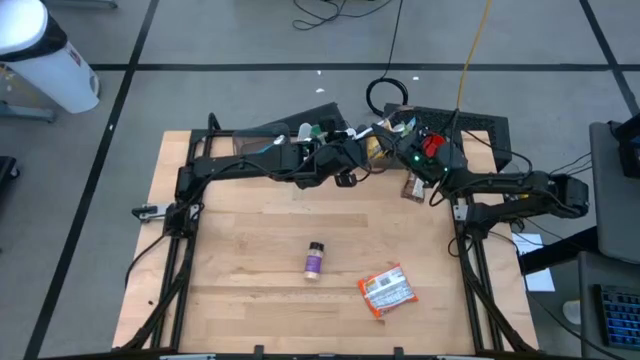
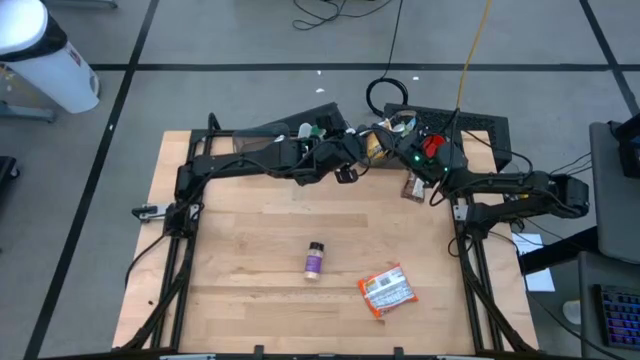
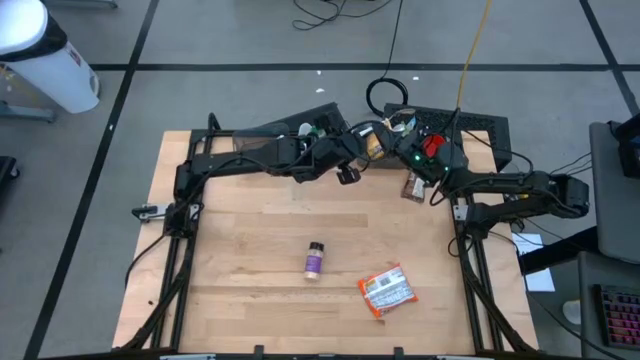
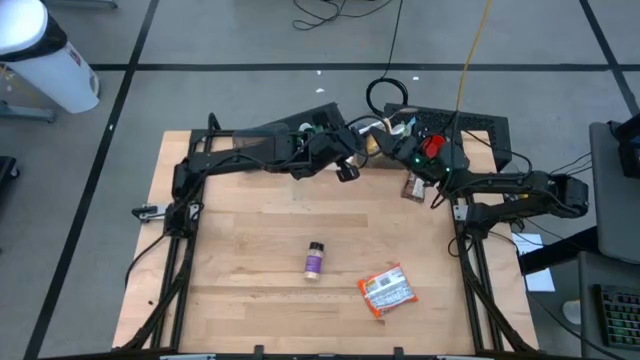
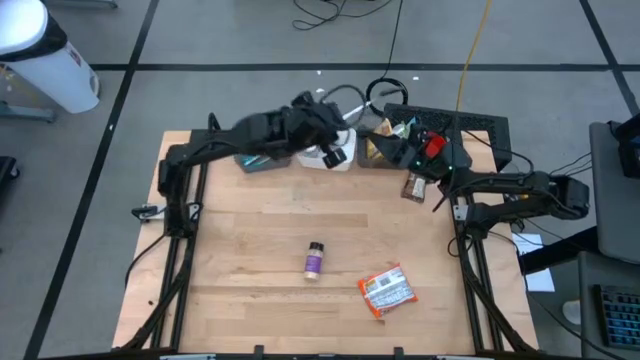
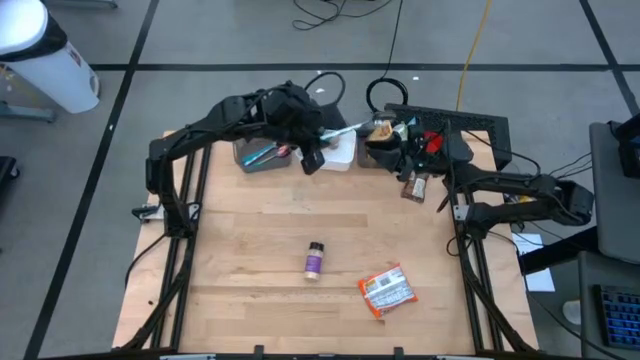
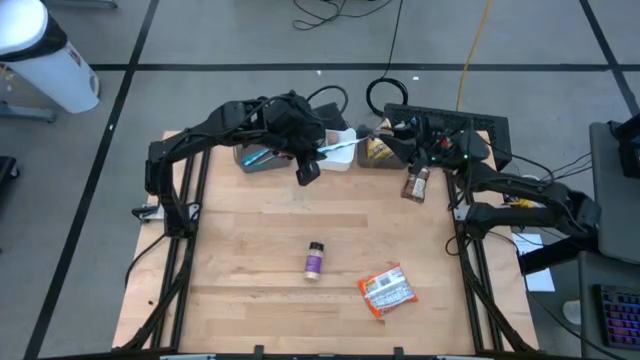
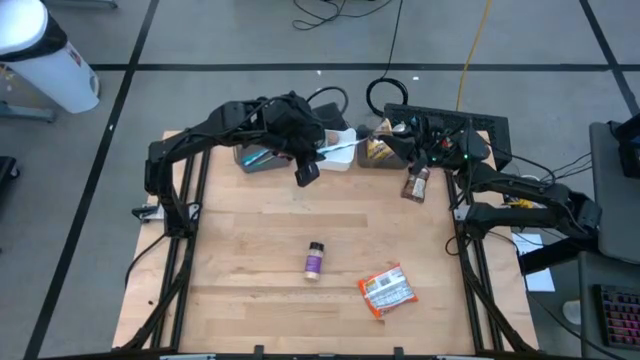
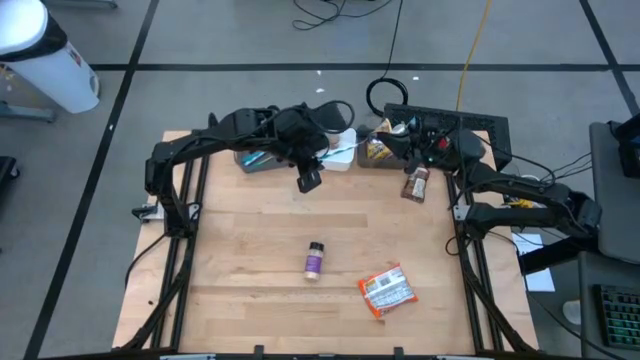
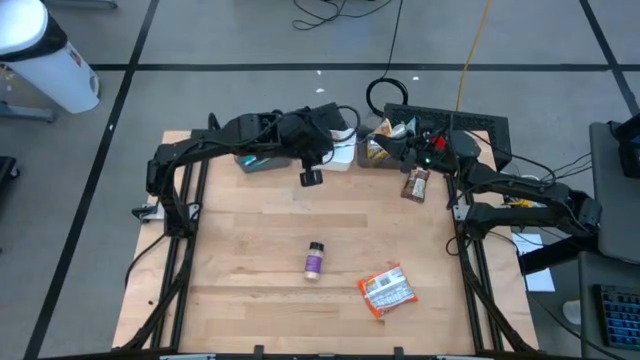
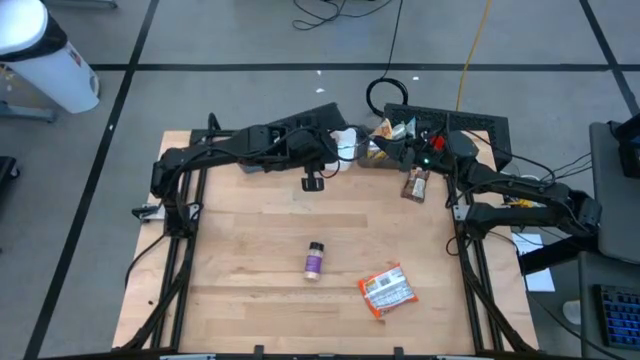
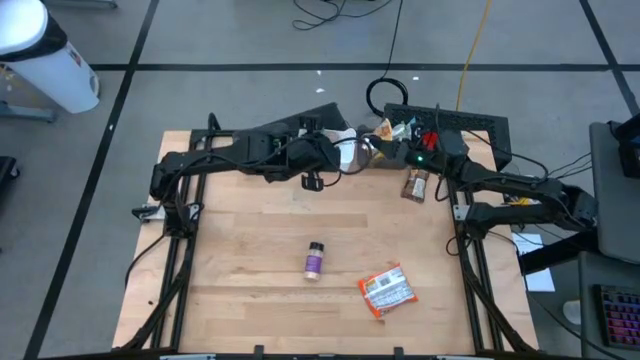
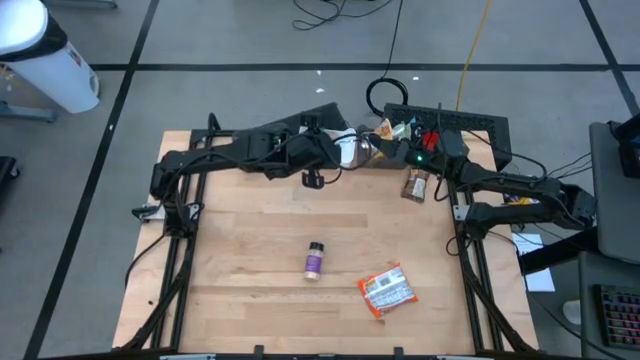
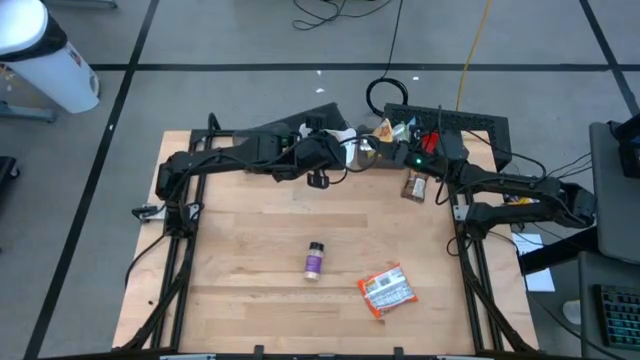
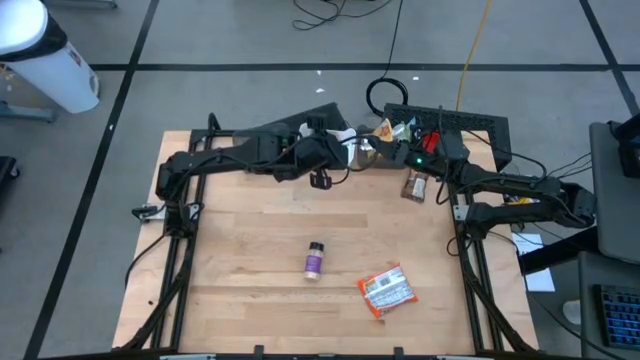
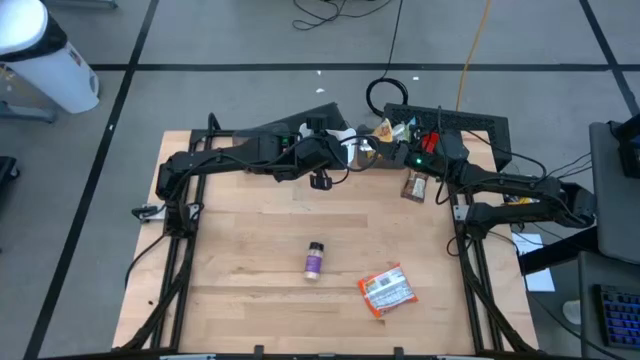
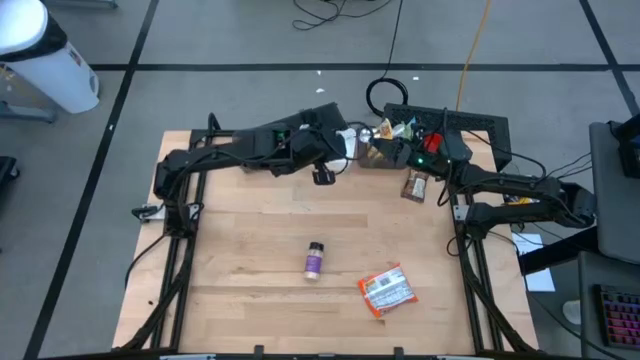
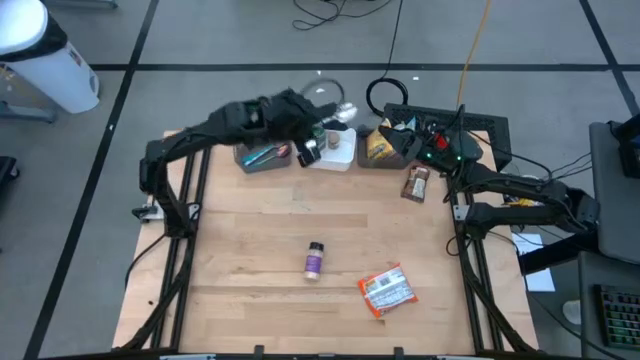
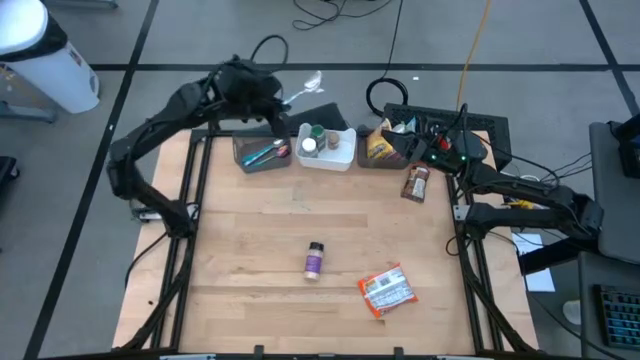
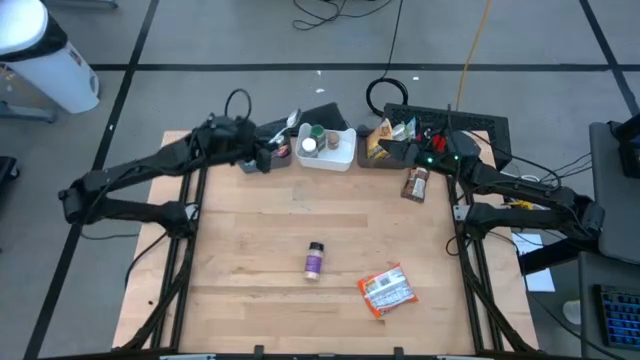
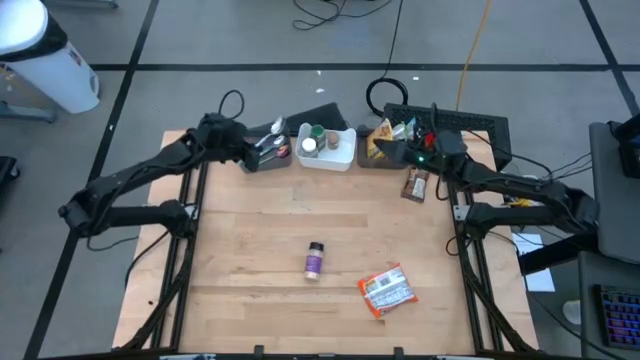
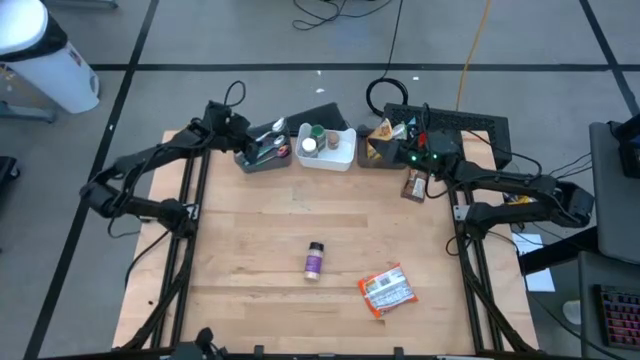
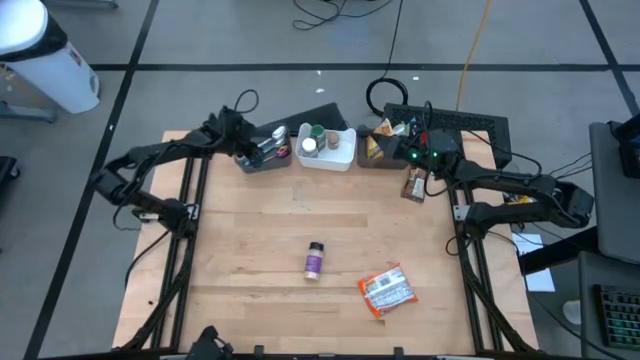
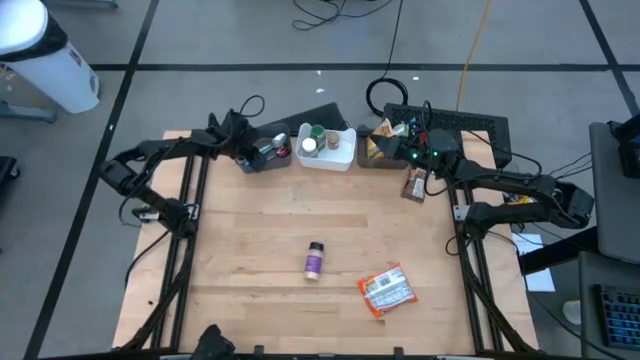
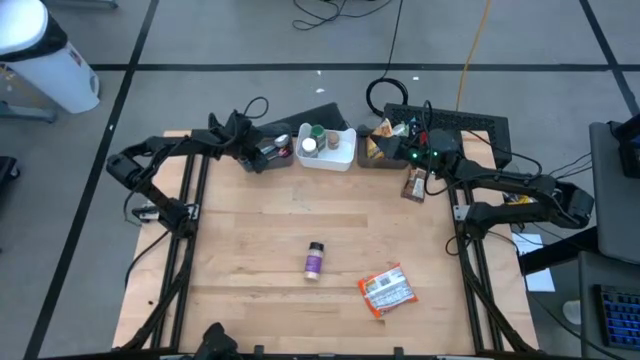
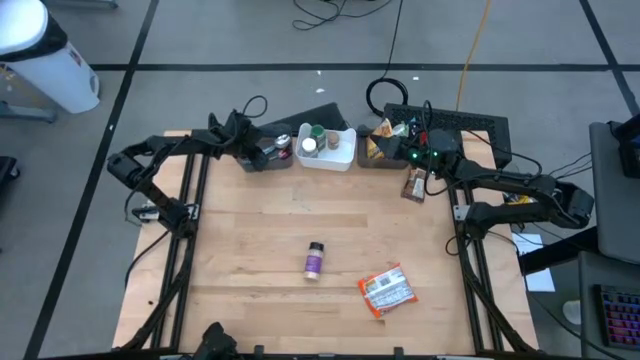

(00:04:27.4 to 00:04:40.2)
Task: Pick & Place Food Item
Put the blue patterned spoon into the left black bin

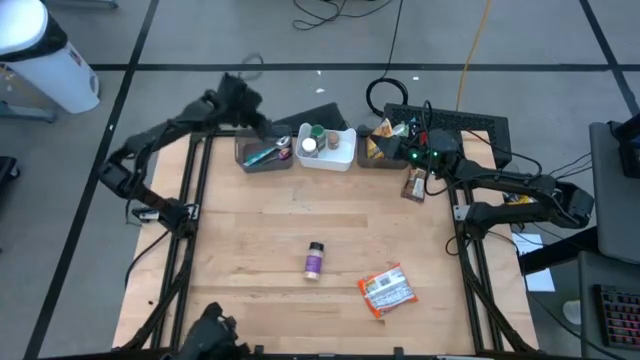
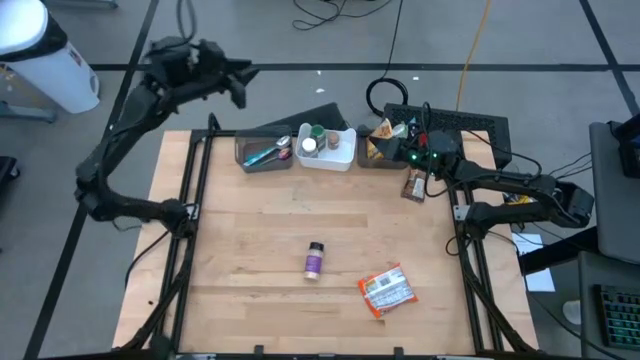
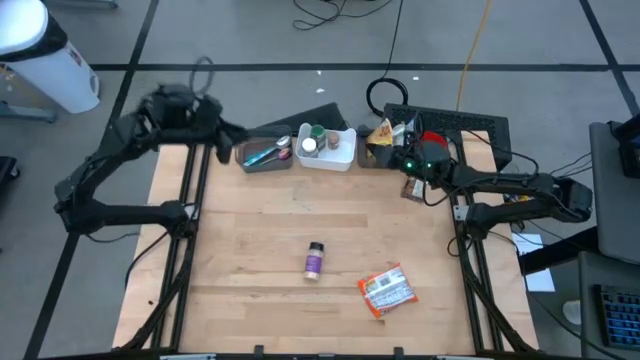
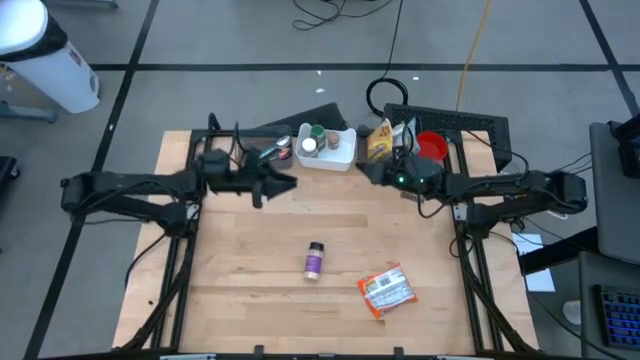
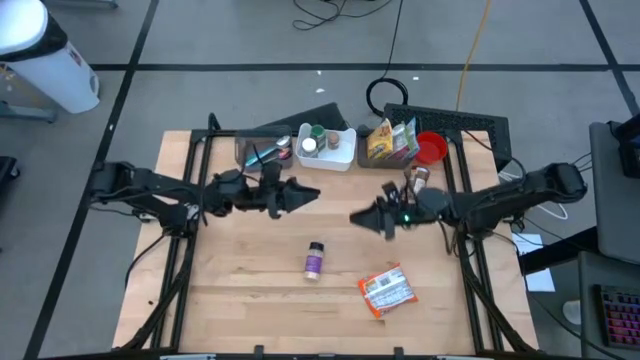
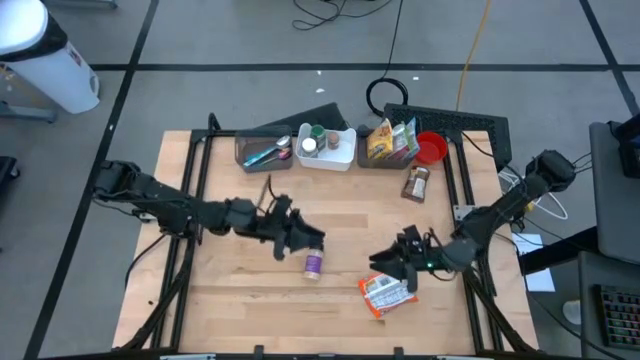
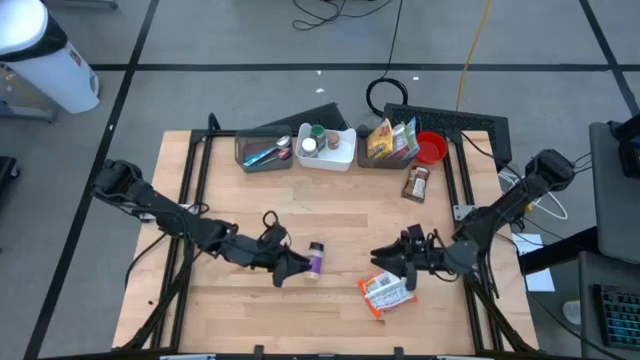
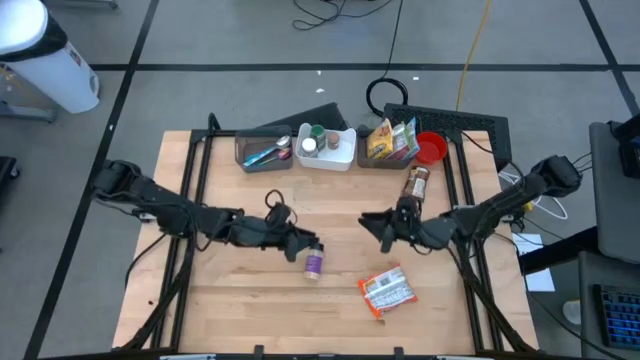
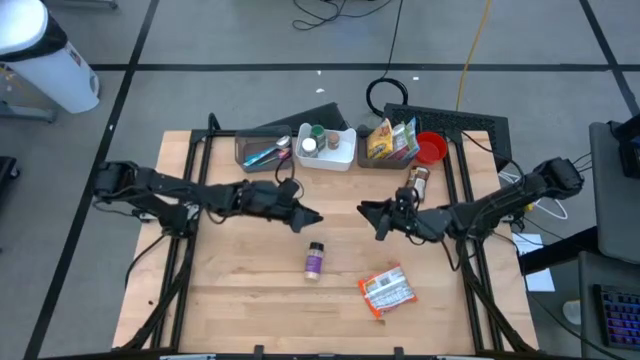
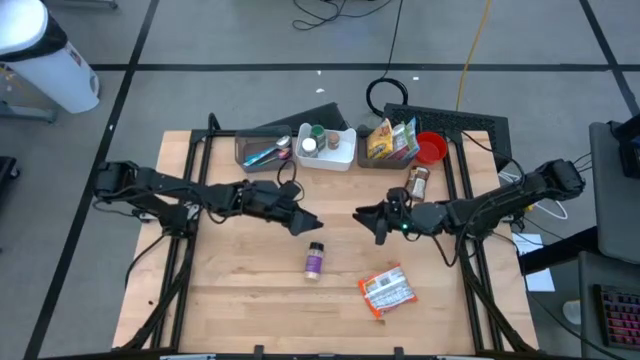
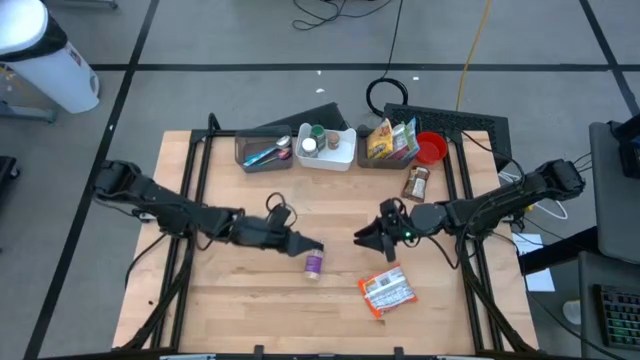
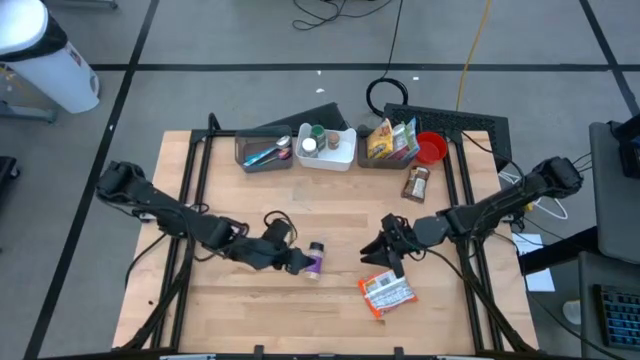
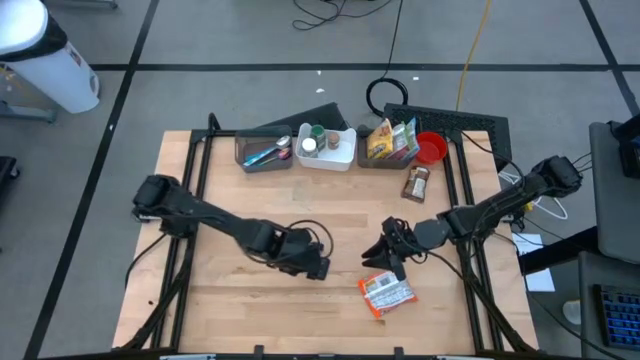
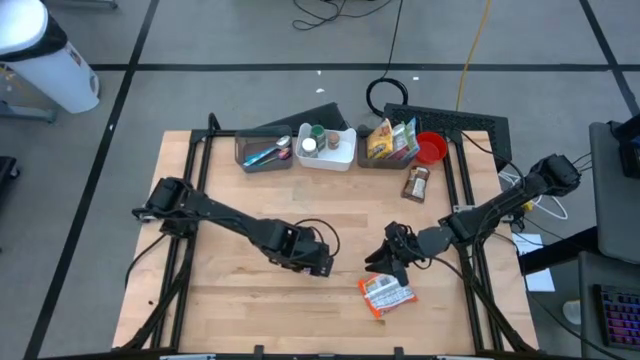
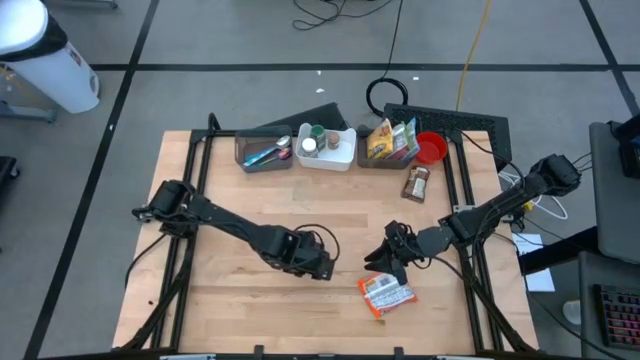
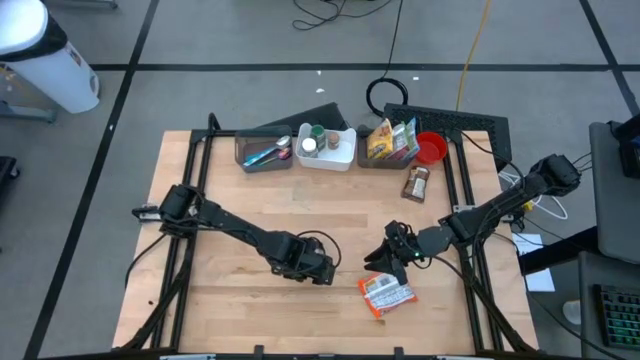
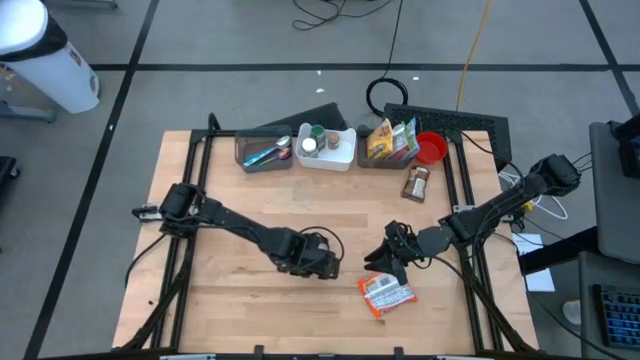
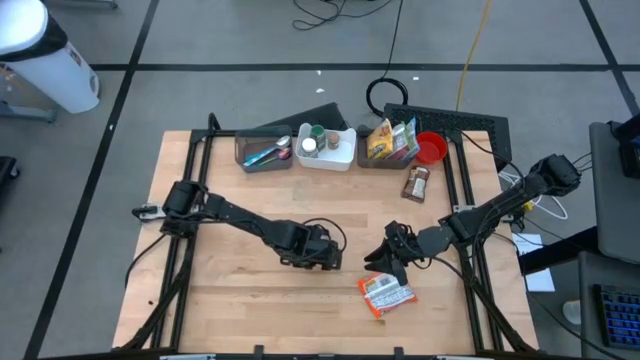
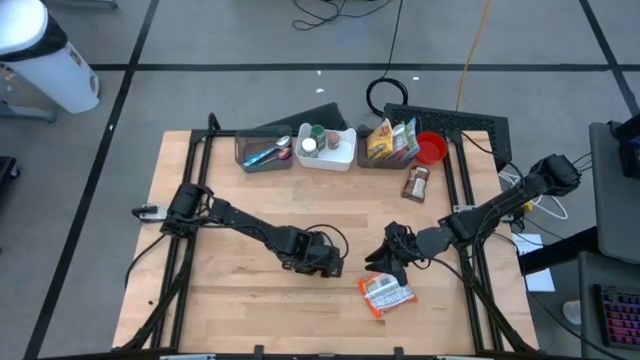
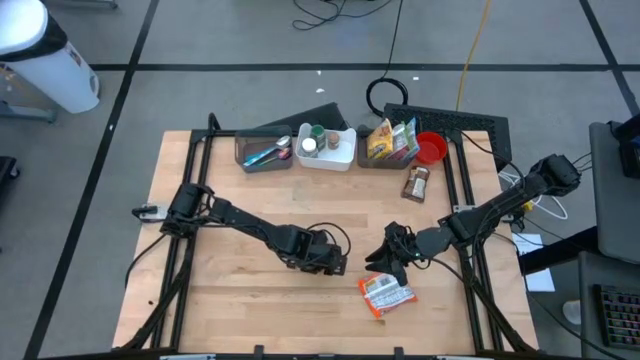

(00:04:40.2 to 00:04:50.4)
Put the black seasoning bottle into the white bin
